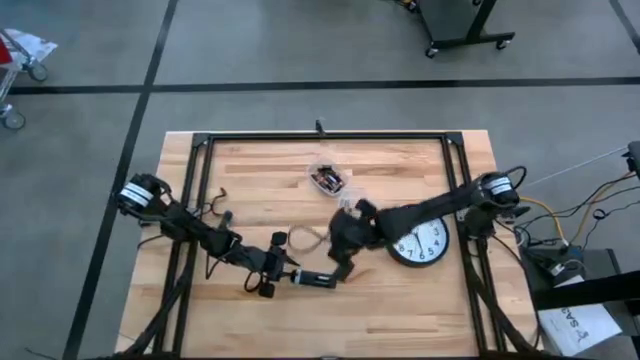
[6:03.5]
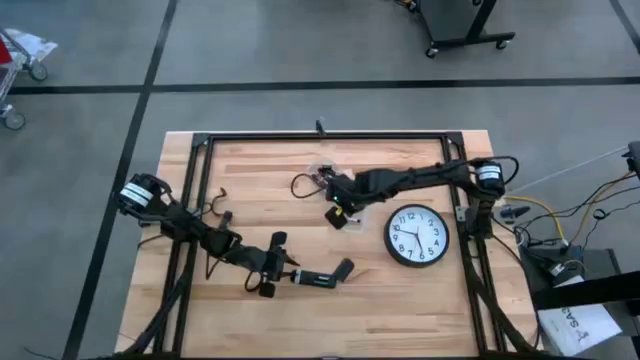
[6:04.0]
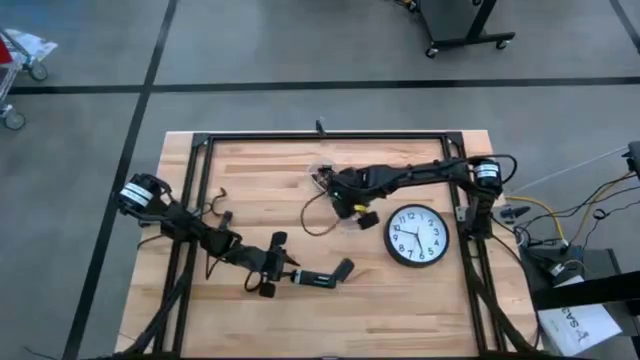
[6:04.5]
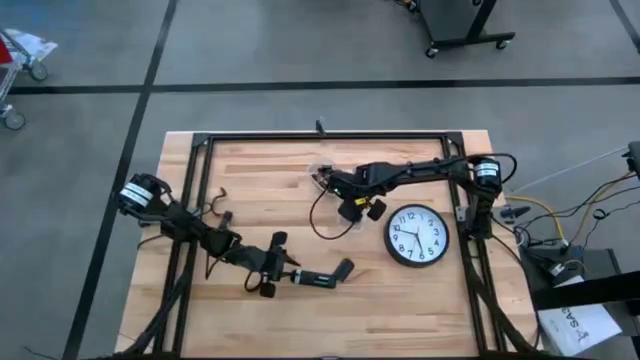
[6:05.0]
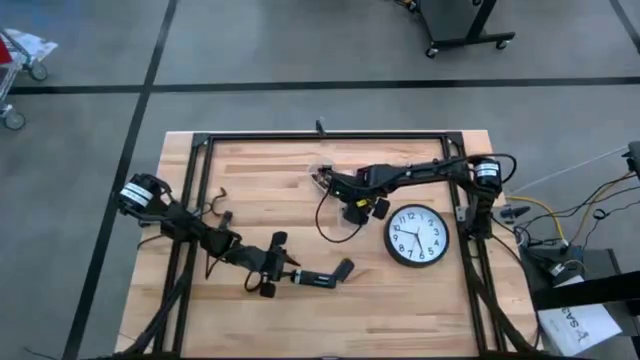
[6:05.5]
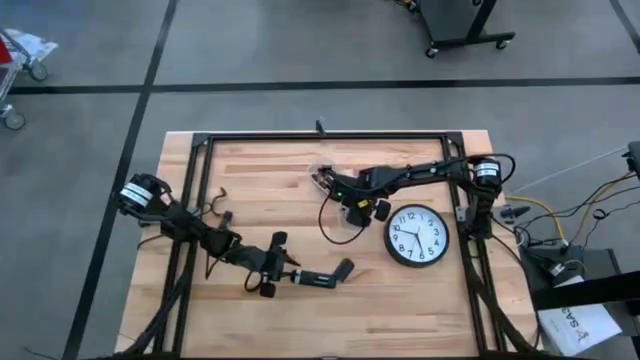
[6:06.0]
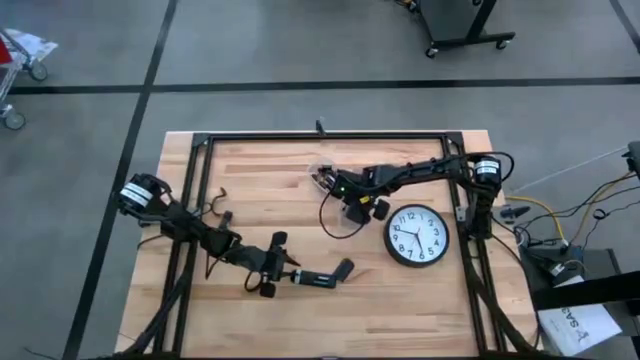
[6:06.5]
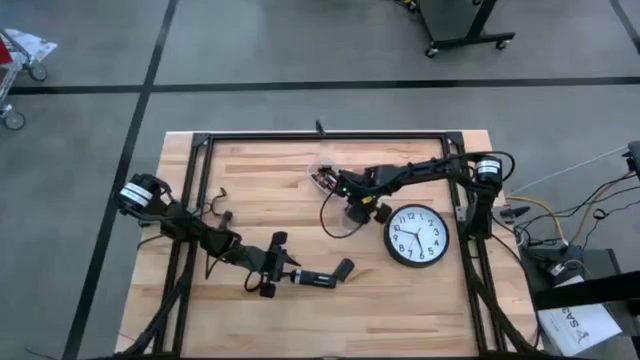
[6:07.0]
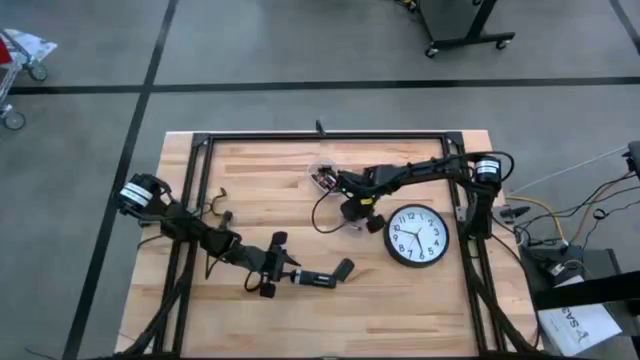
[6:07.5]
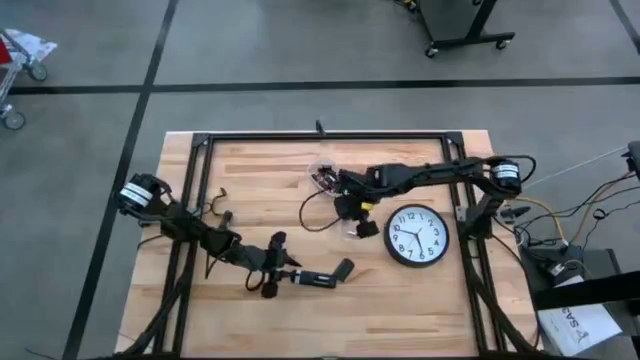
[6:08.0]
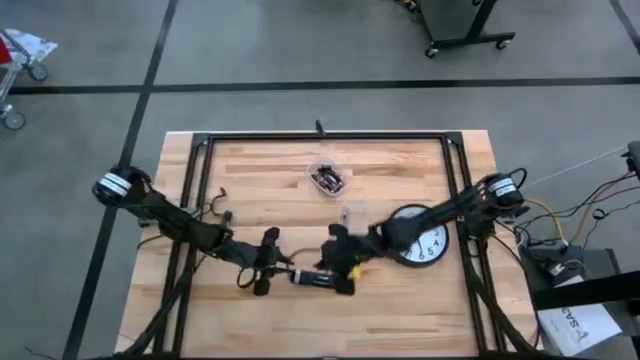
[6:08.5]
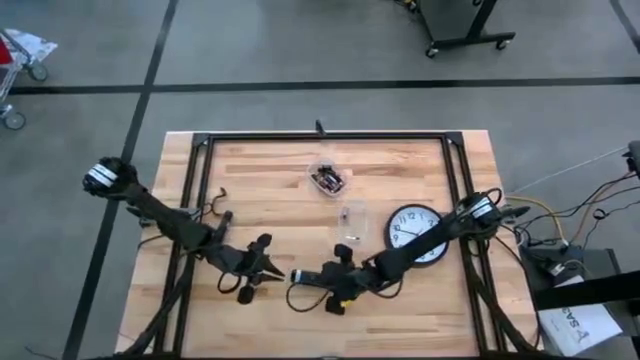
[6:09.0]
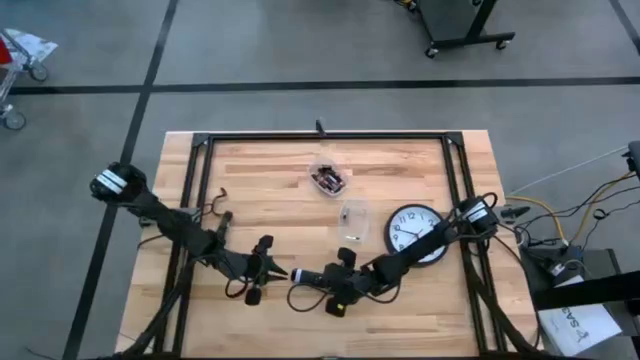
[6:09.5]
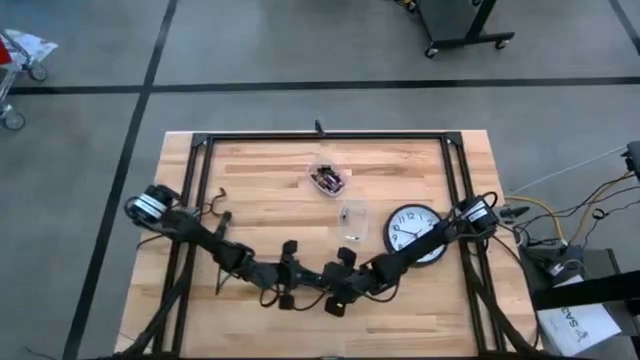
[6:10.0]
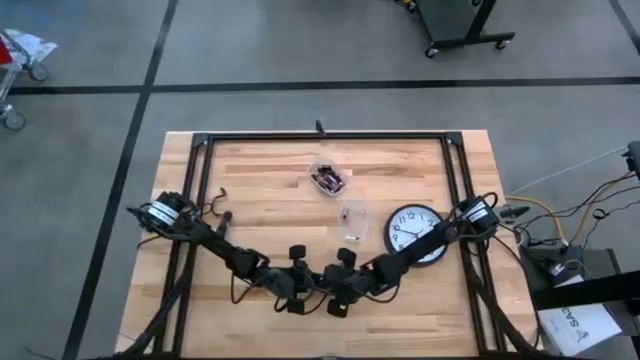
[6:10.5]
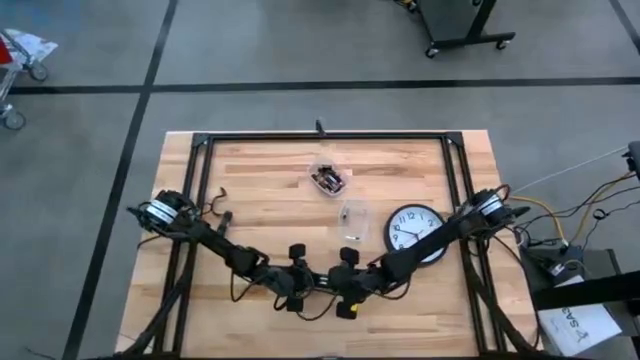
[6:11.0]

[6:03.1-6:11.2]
Task: Insert battery
Insert the silver battery into the remote's battery compartment

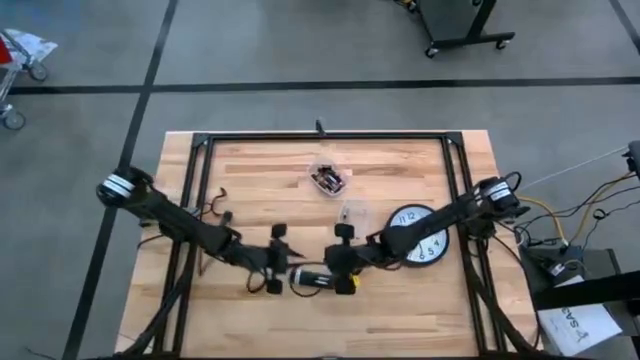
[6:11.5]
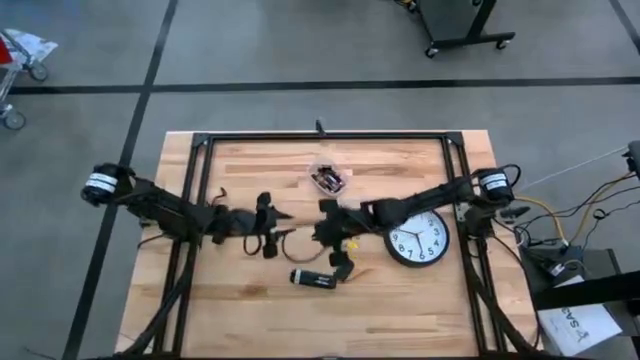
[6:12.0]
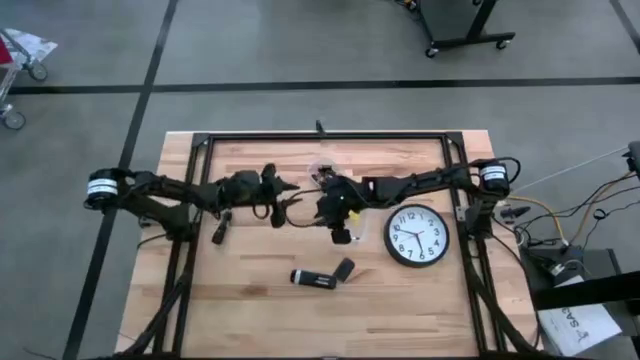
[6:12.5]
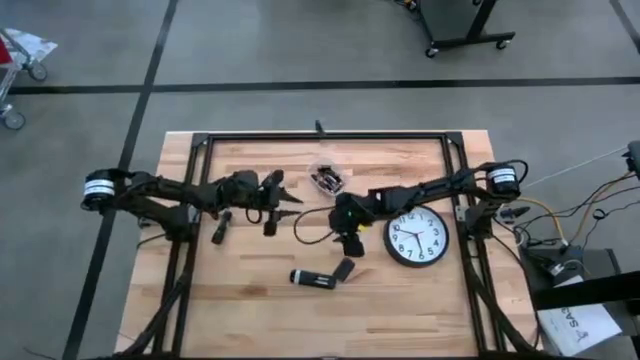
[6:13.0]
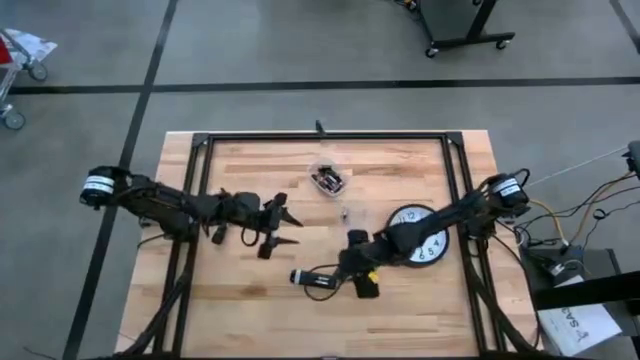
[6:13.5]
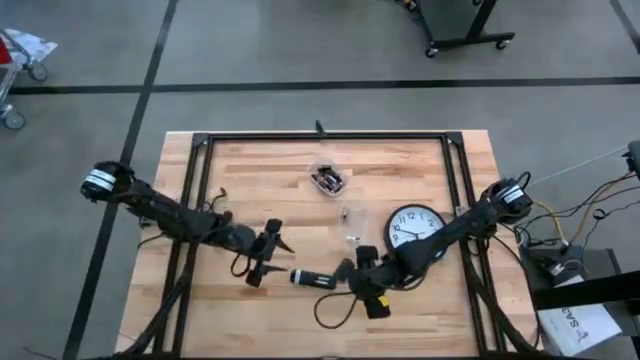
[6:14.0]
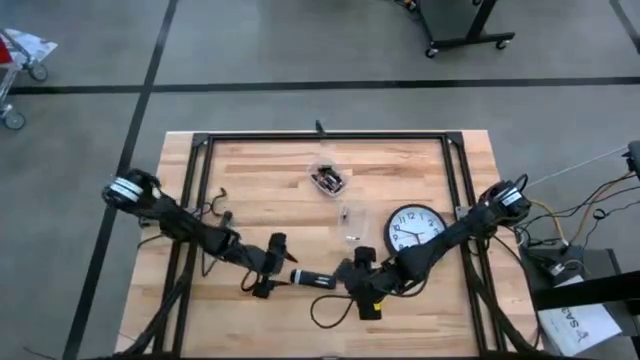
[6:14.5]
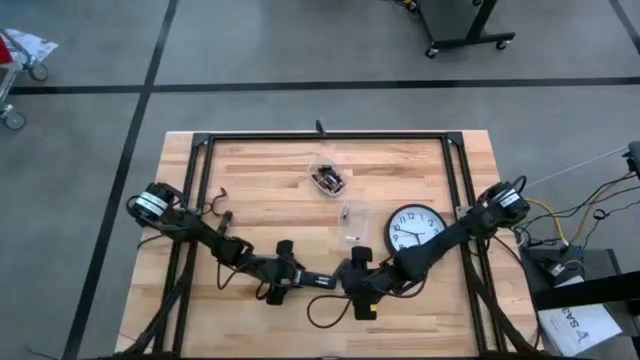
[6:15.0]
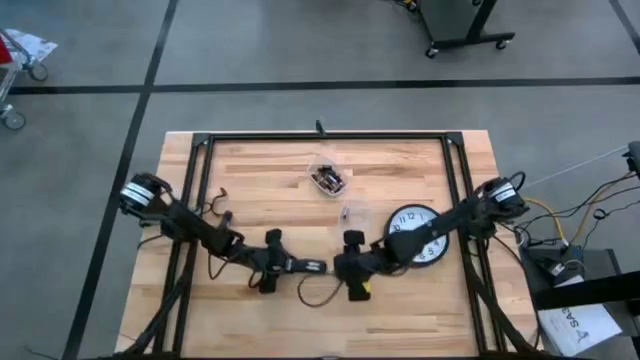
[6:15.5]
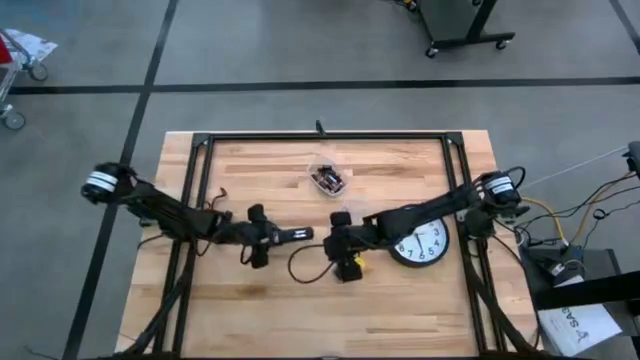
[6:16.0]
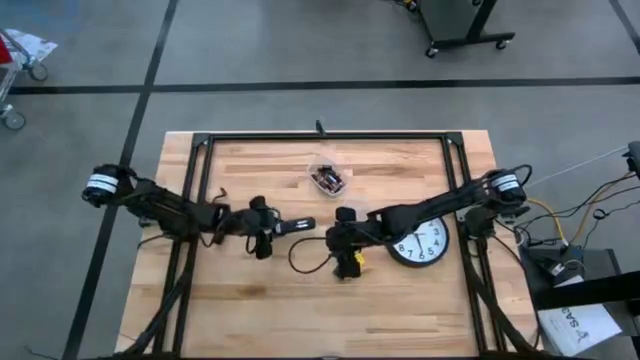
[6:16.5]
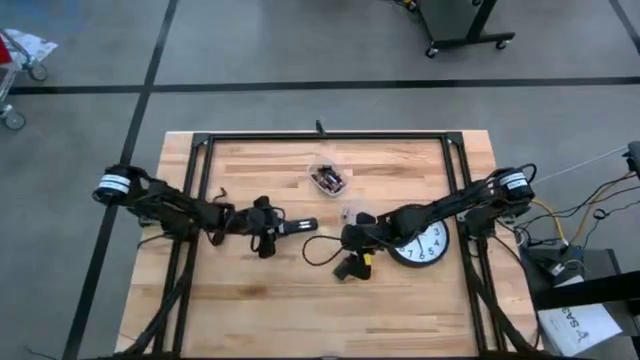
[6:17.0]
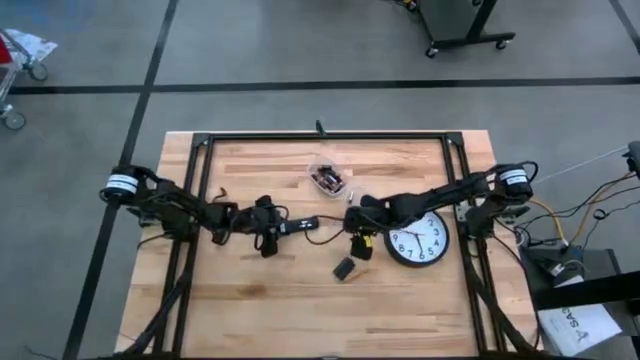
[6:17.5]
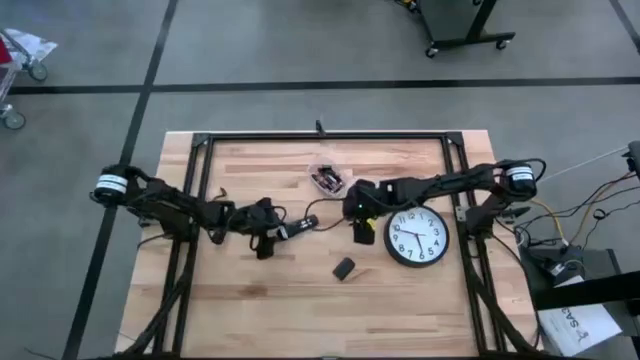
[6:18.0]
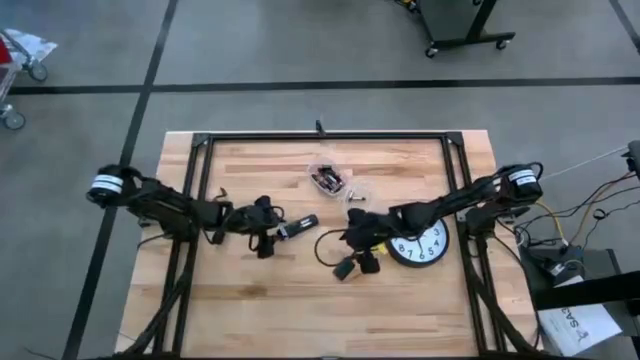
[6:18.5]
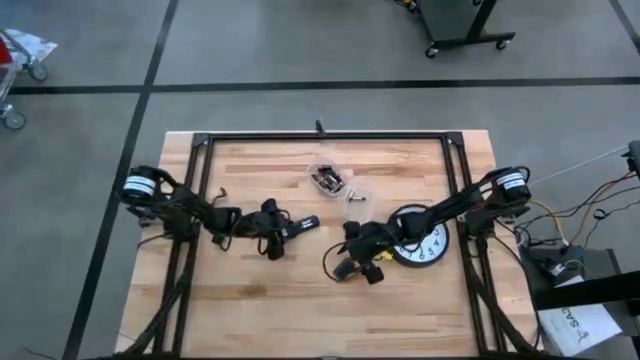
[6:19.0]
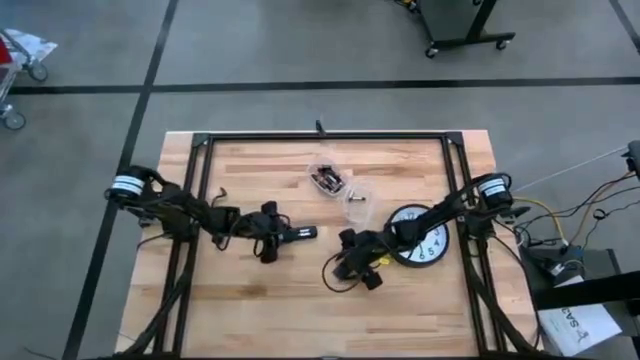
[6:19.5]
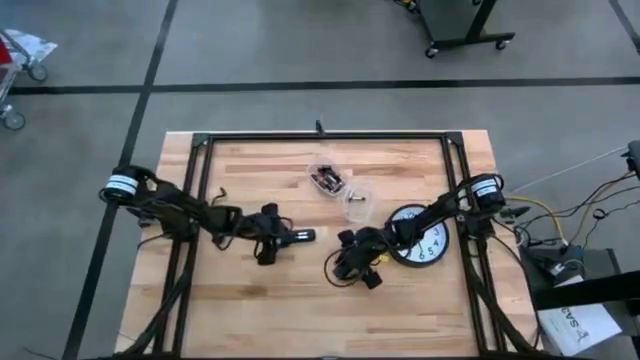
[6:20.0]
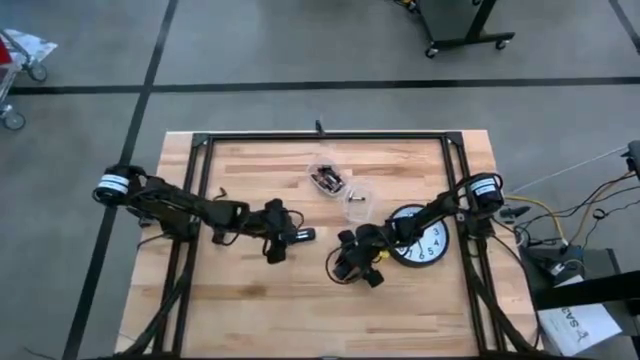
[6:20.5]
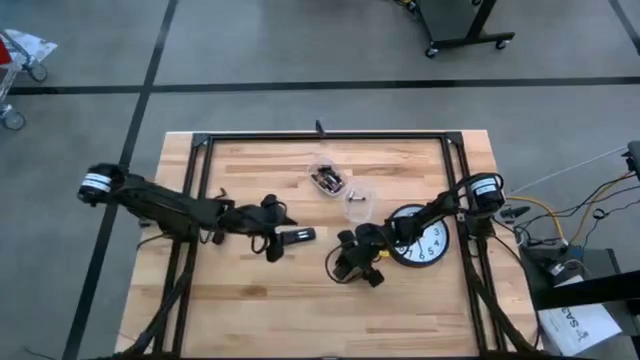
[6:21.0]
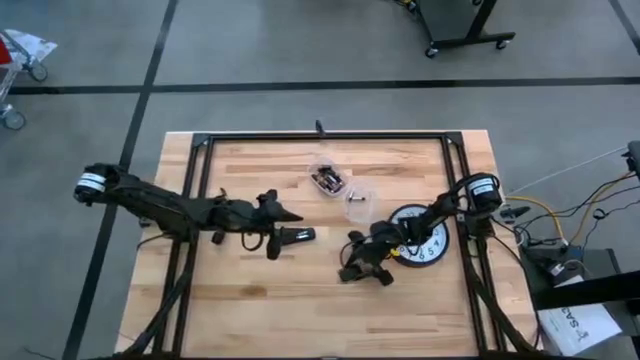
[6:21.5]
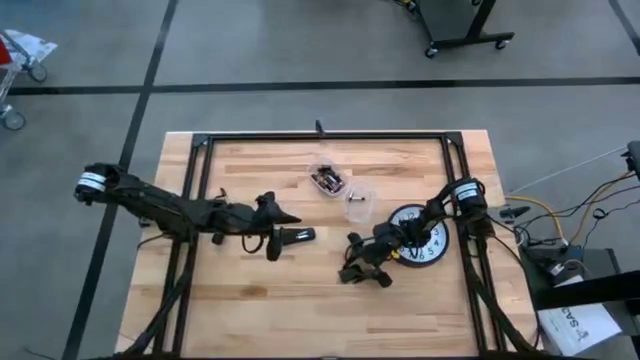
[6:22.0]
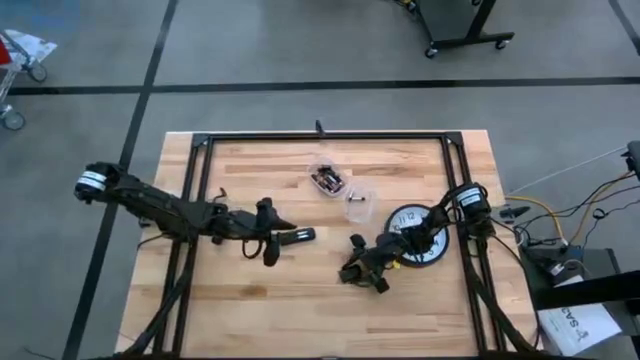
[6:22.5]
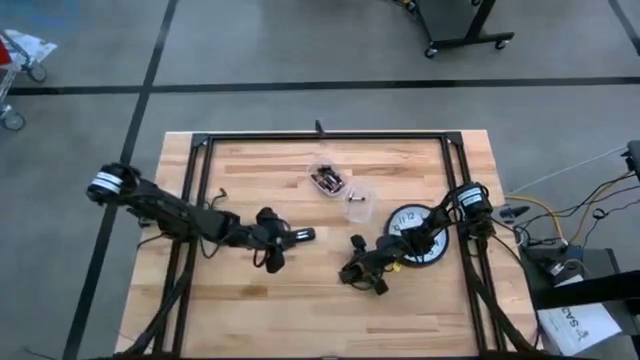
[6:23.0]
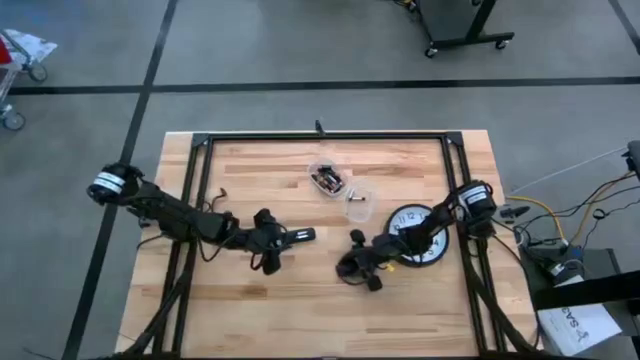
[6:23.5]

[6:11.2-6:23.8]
Close the black remote battery cover
